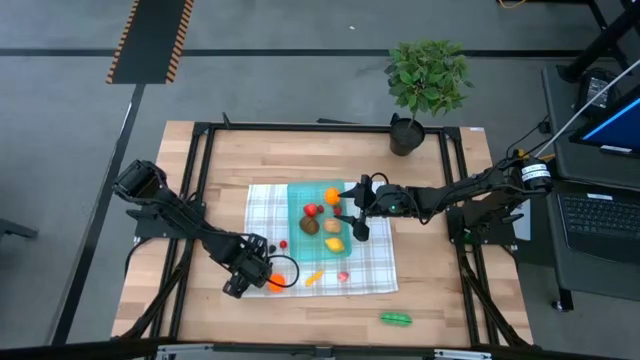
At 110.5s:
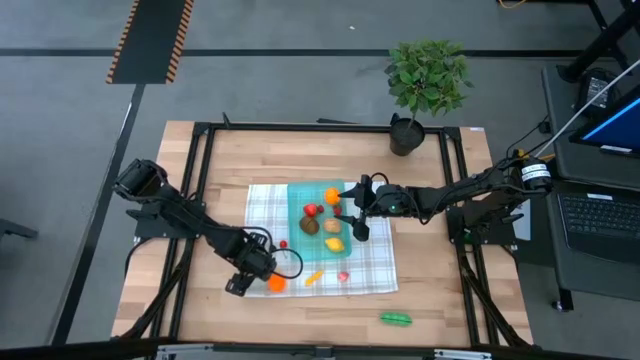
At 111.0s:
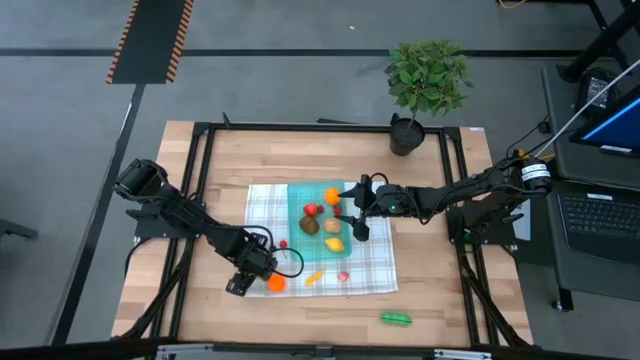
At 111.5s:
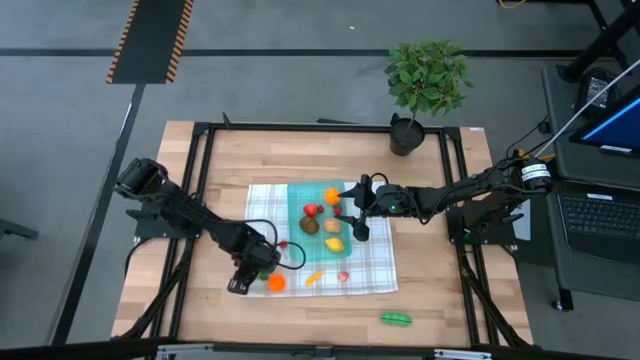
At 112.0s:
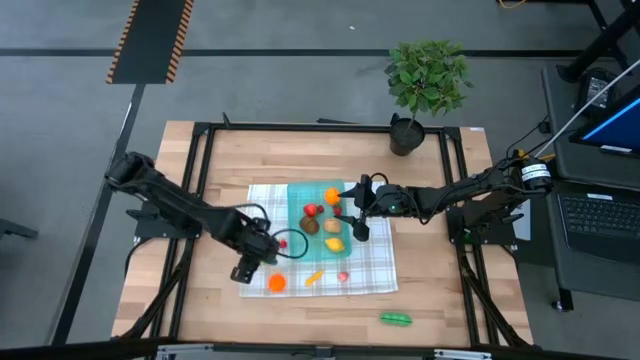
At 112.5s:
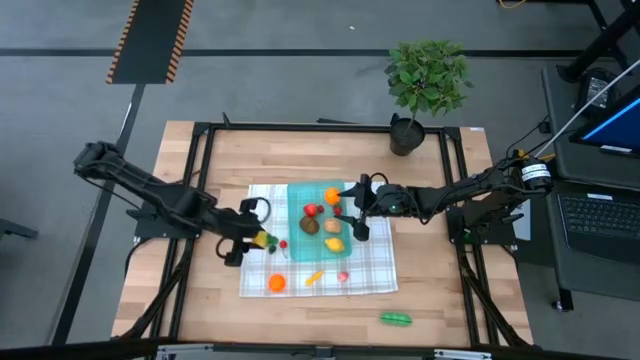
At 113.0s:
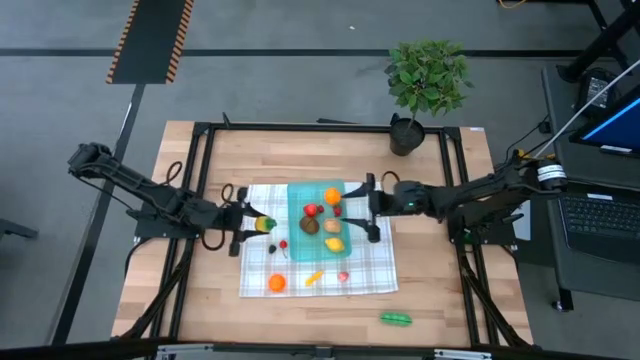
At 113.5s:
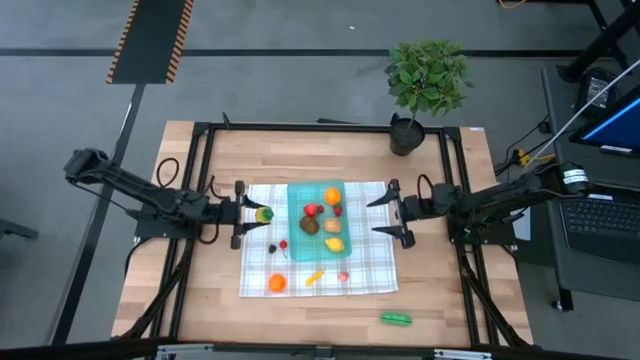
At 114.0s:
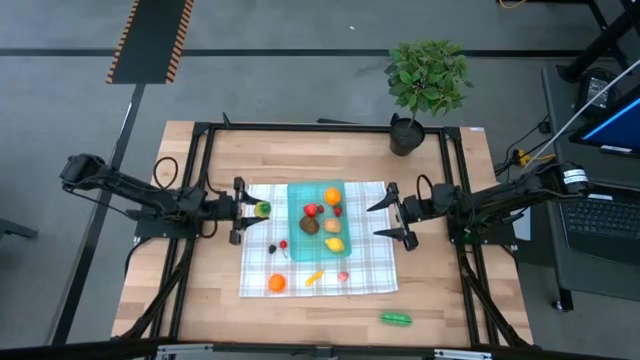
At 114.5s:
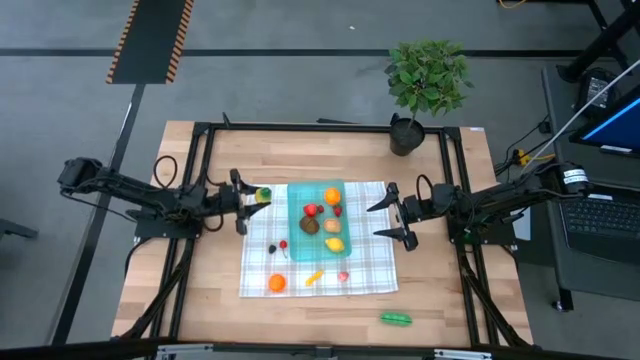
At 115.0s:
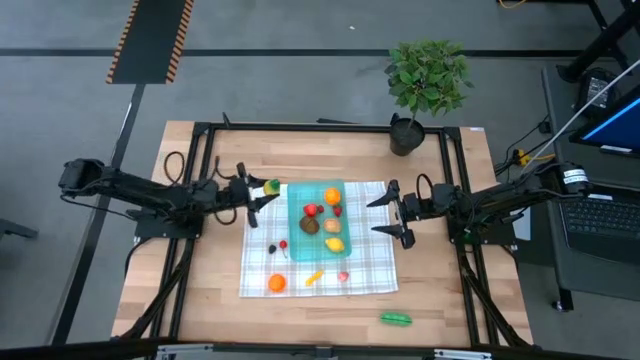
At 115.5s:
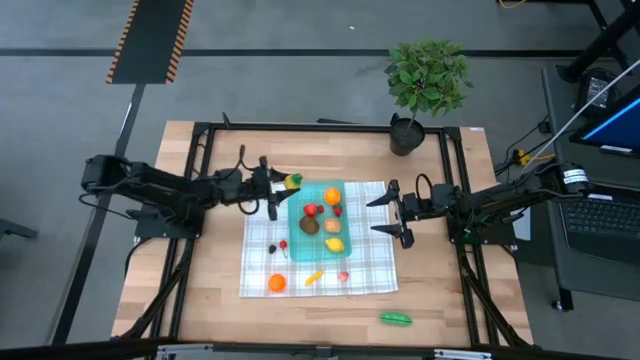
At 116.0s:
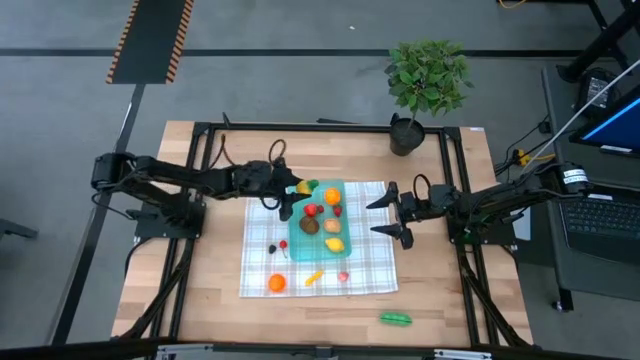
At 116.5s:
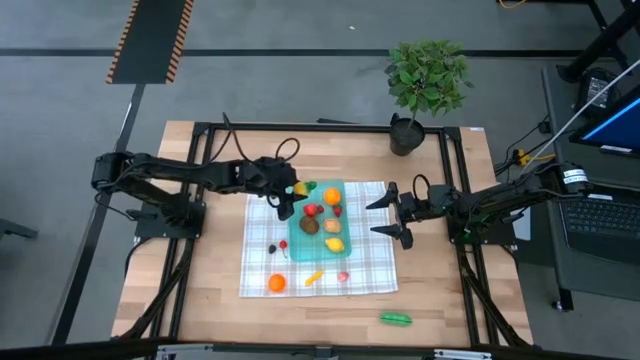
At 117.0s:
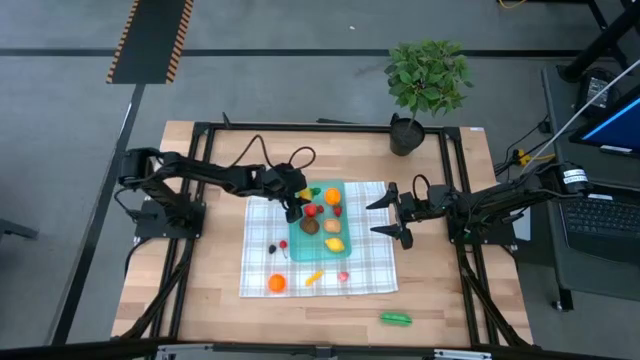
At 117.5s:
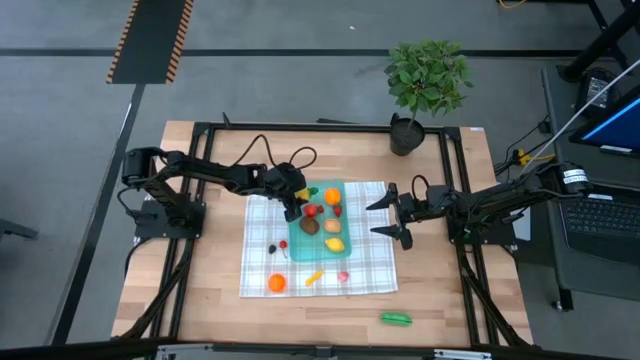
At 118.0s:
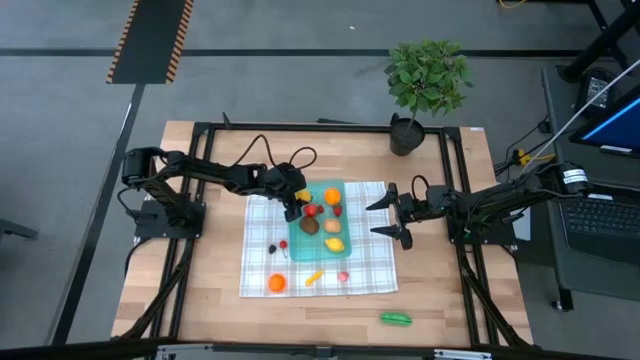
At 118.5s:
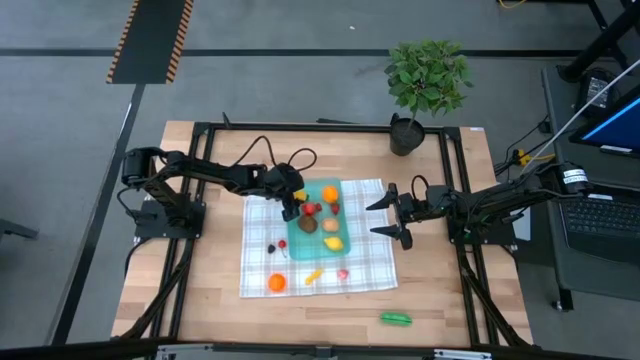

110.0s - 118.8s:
Task: Pick and placing Produce into tupperware
Put the pineapple into the blue bin

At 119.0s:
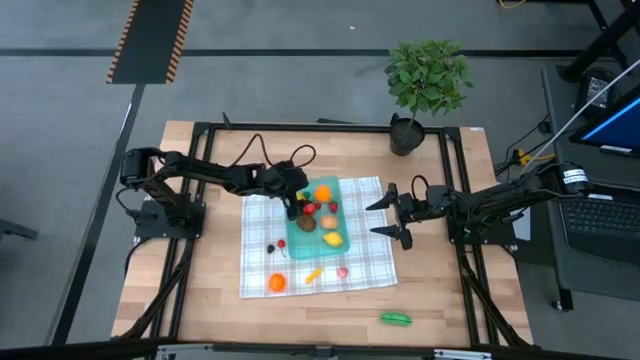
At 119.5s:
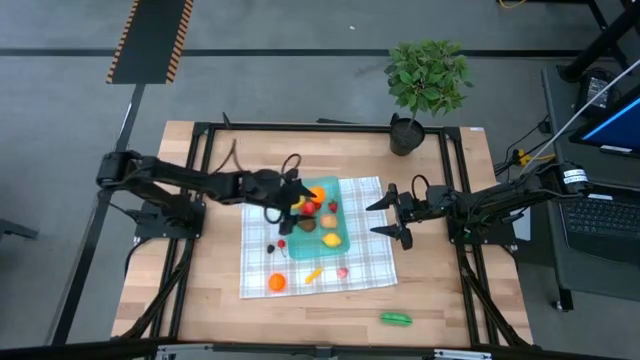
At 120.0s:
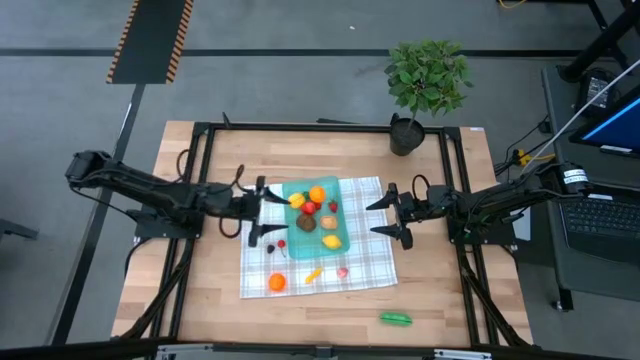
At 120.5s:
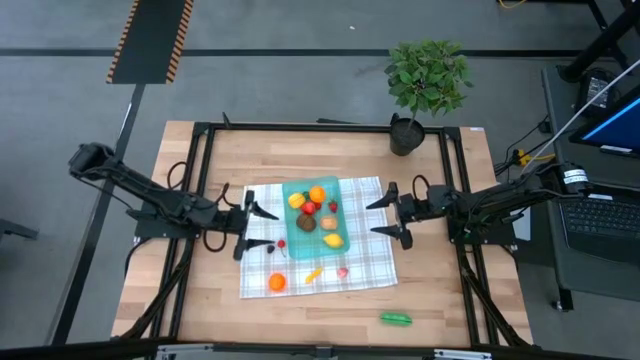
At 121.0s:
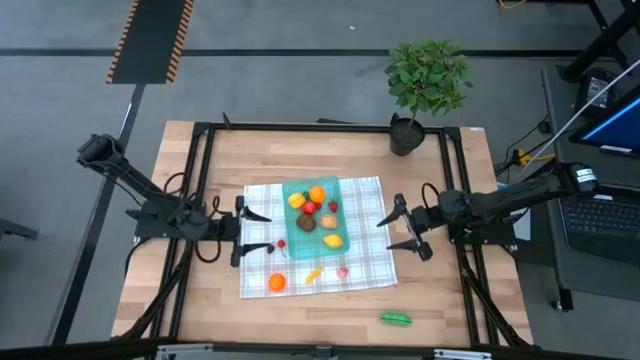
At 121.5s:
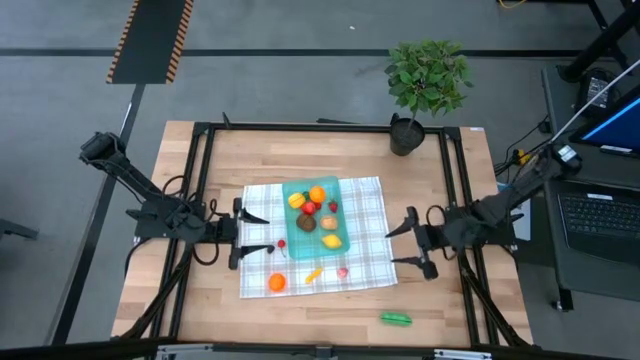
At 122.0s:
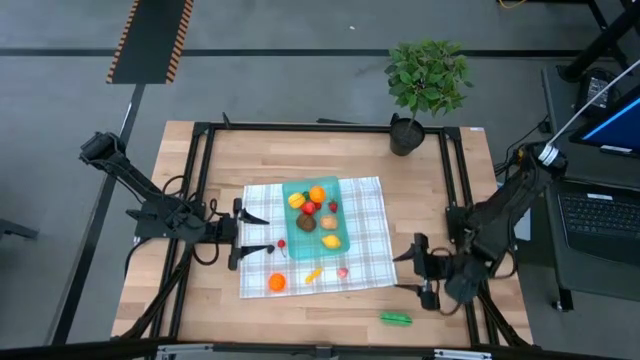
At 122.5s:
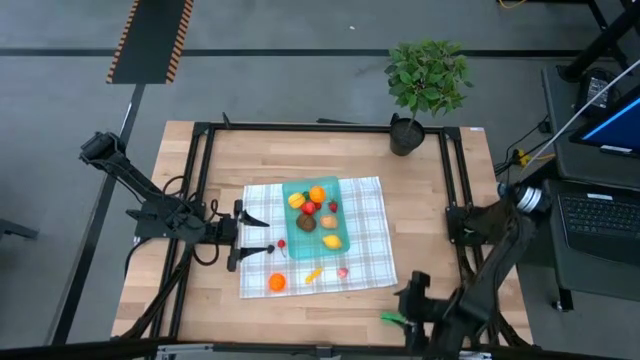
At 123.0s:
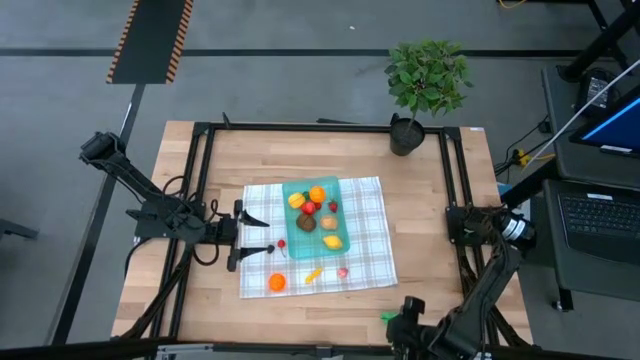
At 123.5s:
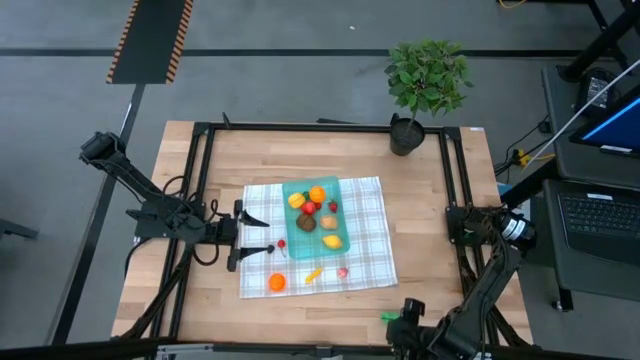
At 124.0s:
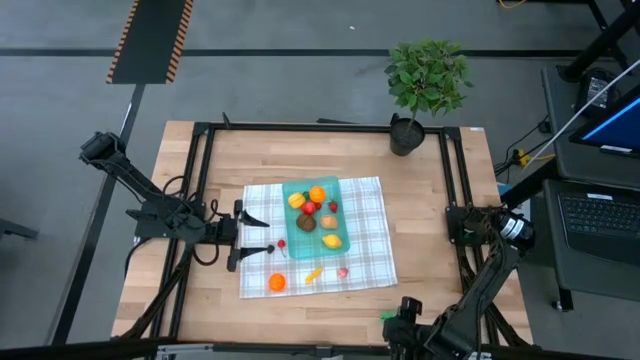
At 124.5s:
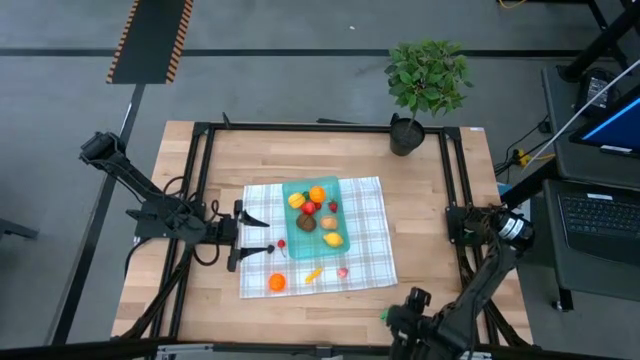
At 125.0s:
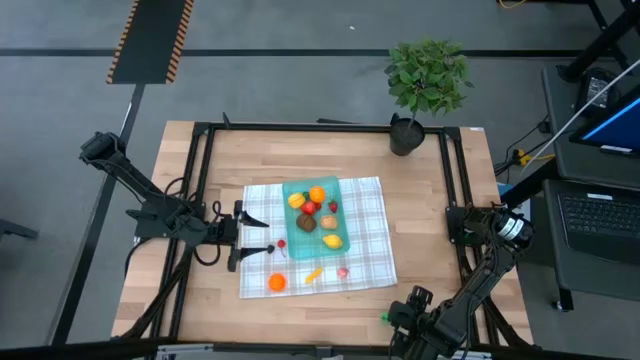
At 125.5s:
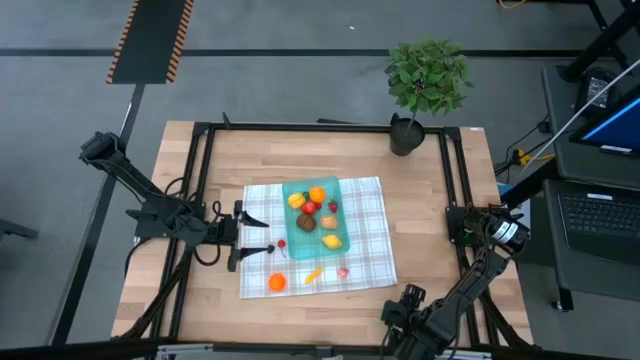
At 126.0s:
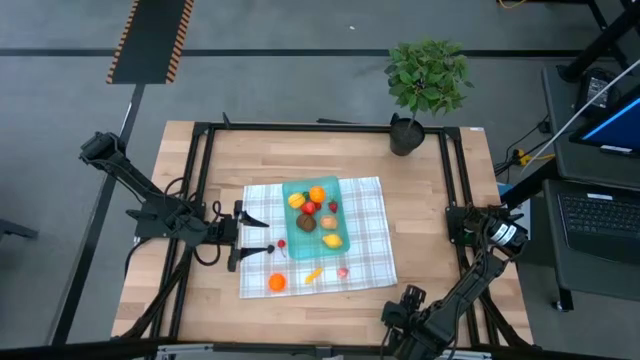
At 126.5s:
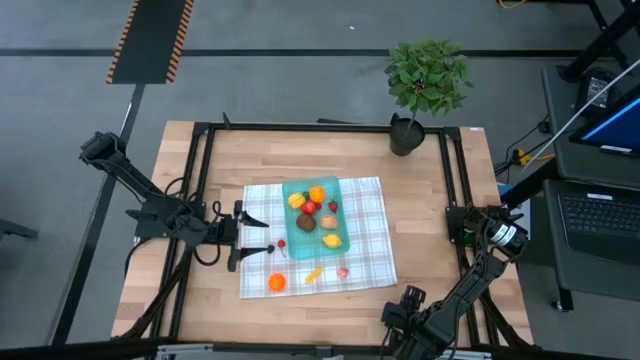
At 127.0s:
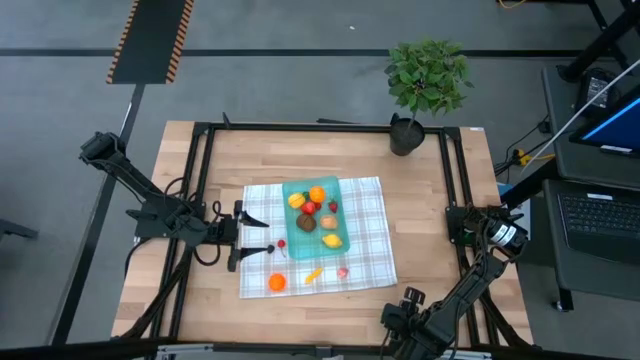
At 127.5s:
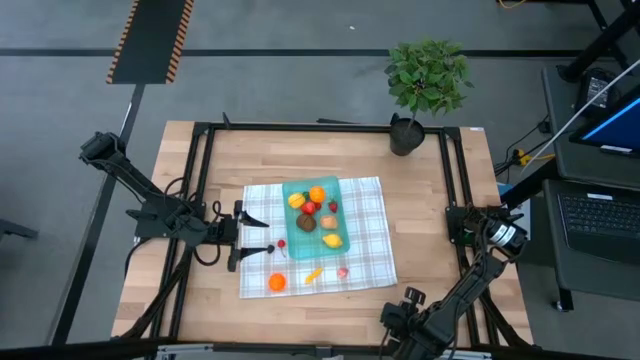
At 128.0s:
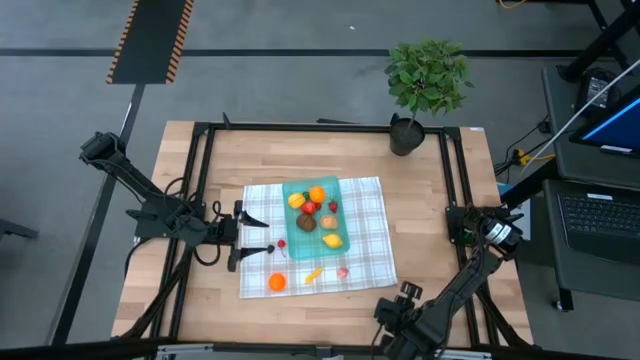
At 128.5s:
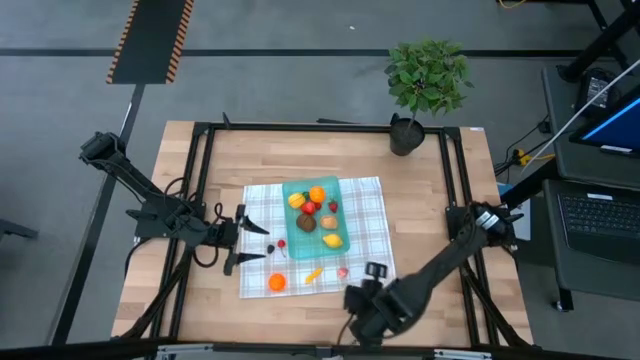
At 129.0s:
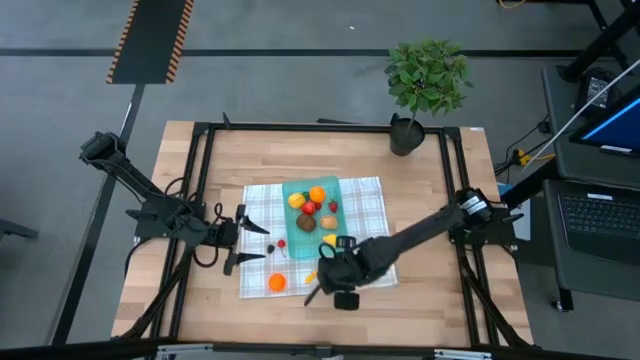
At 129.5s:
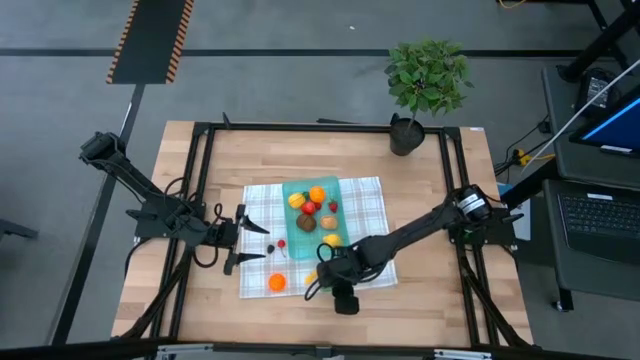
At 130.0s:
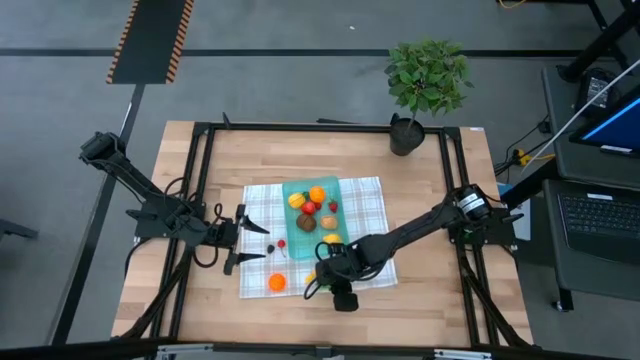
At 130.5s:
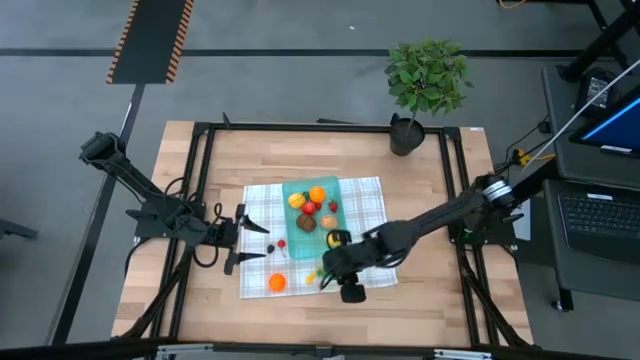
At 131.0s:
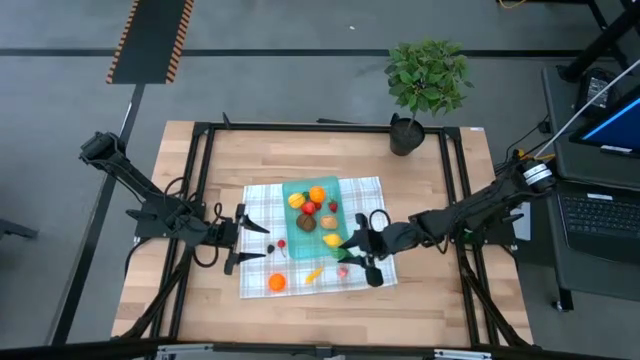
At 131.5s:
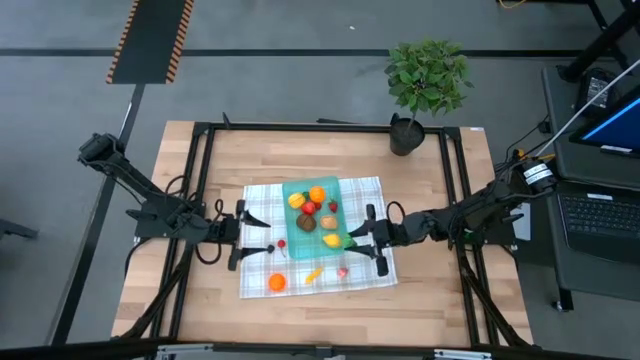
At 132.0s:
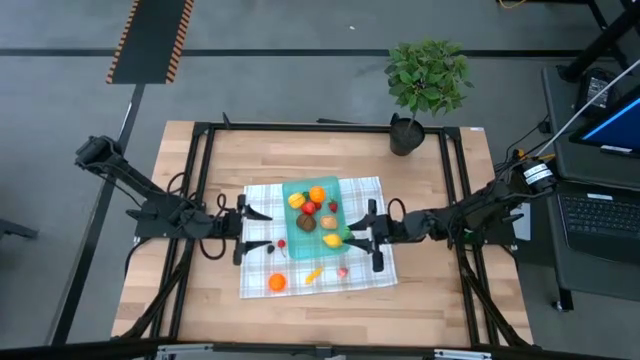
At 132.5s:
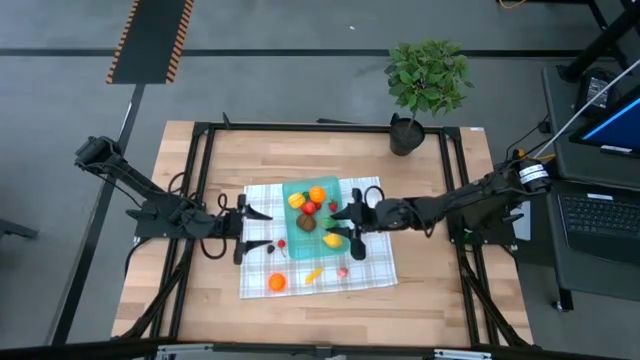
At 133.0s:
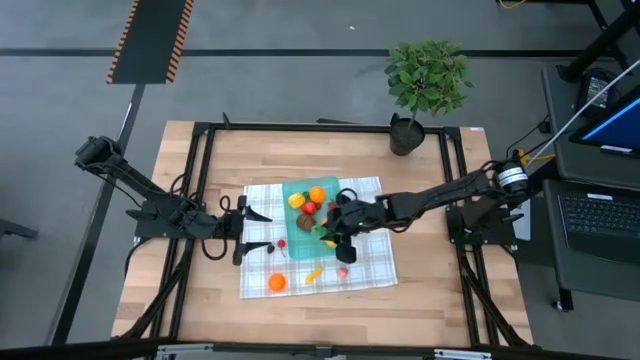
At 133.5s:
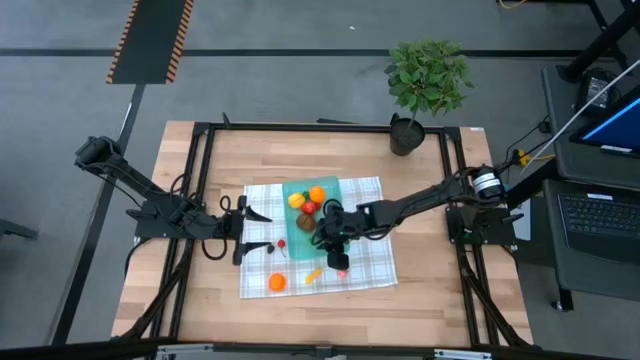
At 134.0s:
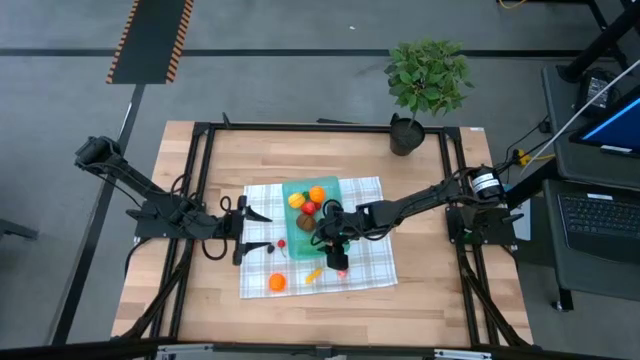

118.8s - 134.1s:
Put the green peas into the blue bin
